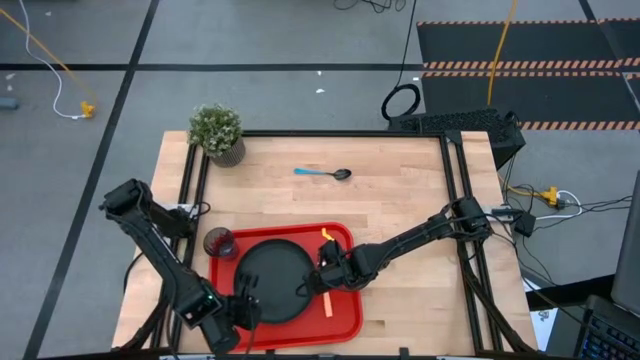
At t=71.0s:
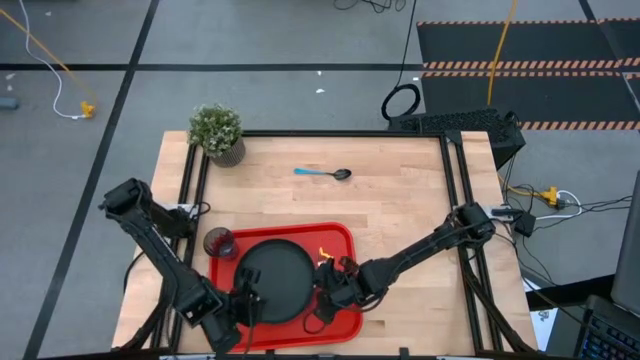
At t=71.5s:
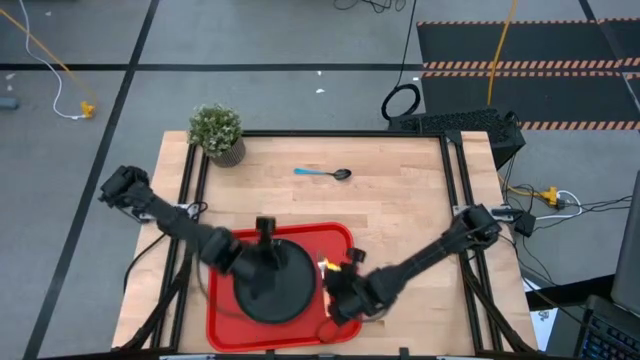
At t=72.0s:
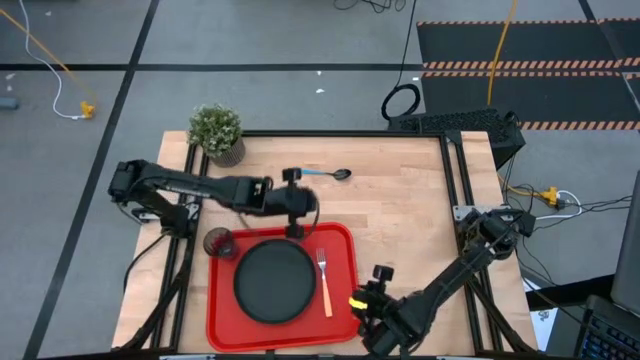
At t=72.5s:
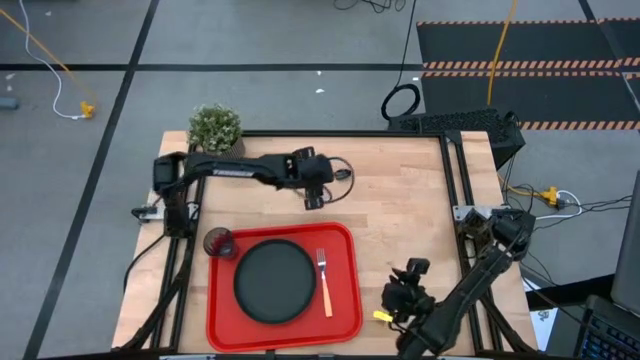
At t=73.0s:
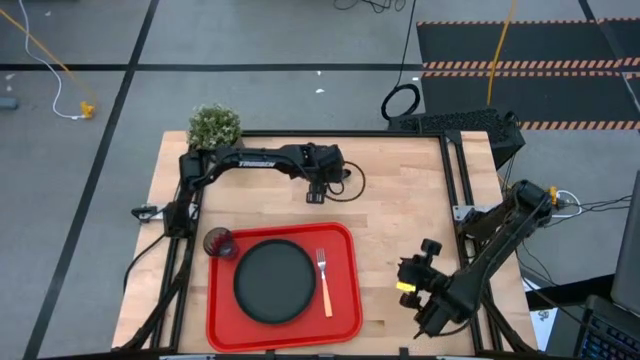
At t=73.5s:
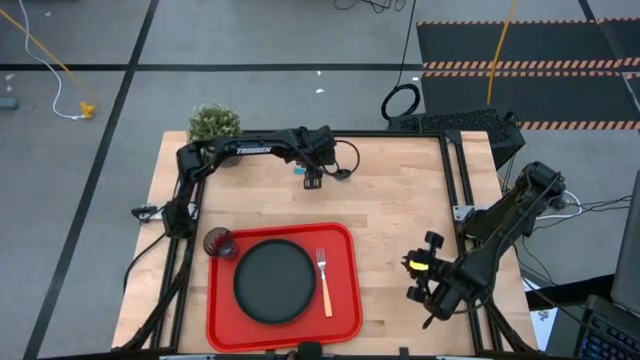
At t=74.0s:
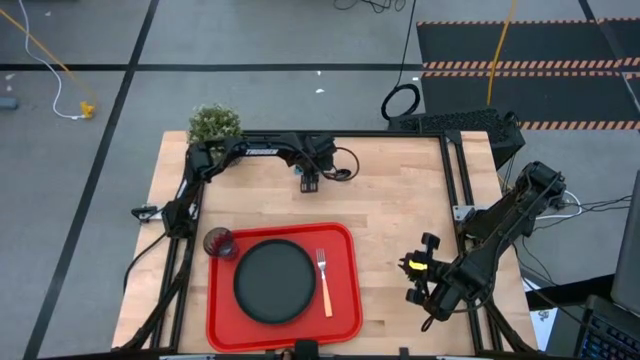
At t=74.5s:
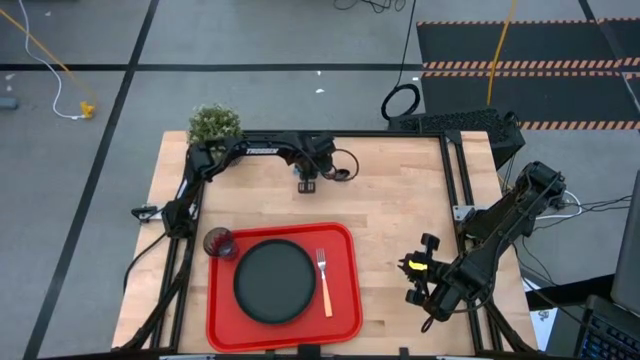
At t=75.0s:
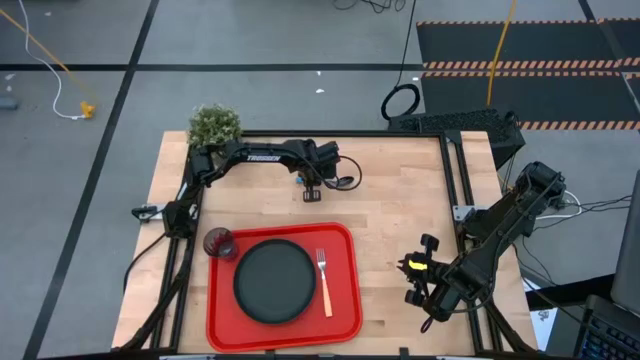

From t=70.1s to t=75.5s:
Task: Pick and place plate/cup/fork/spoon on tray
Put the blue spoon on red the serving tray on the right side of the orange fork

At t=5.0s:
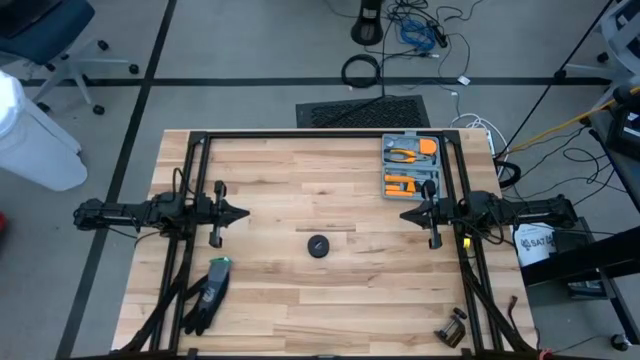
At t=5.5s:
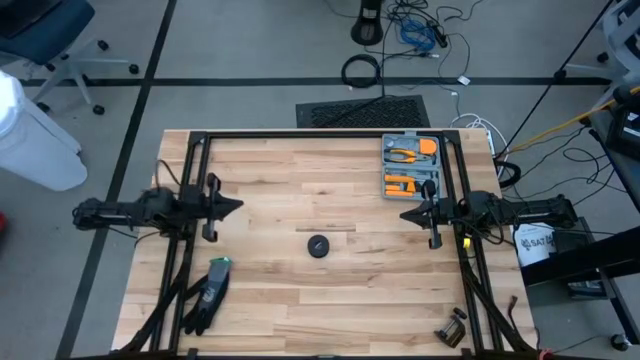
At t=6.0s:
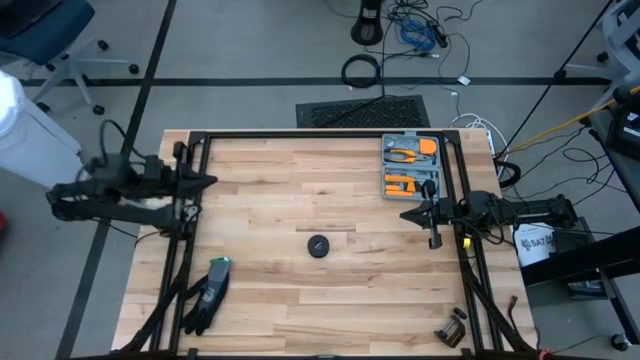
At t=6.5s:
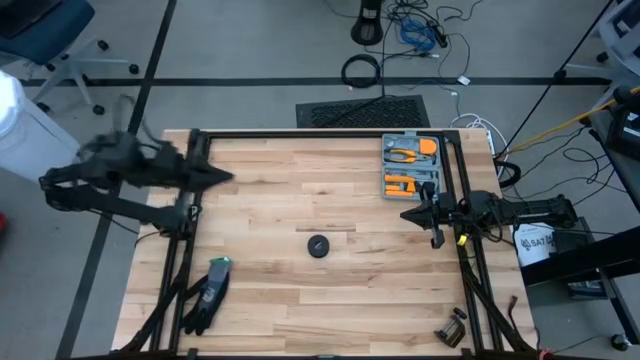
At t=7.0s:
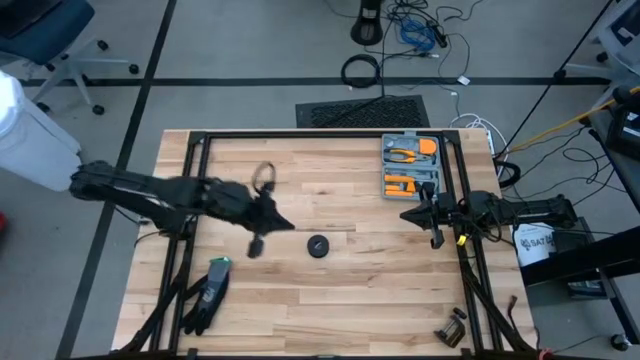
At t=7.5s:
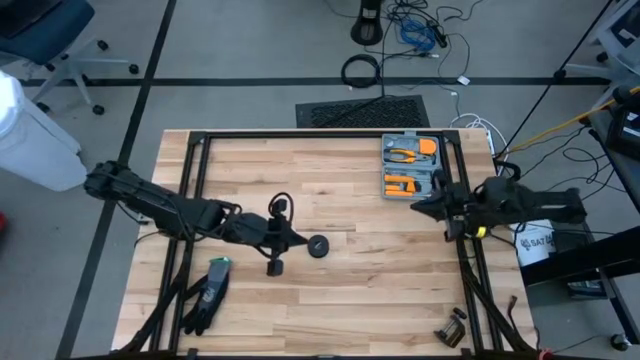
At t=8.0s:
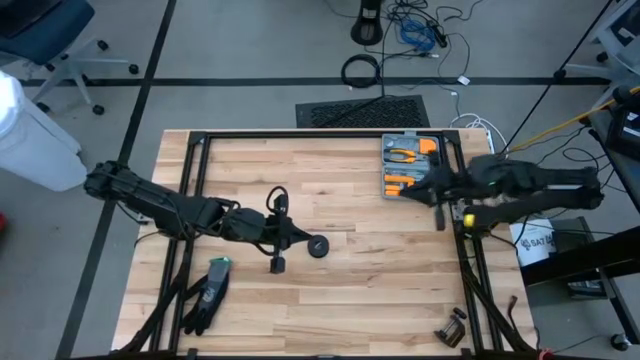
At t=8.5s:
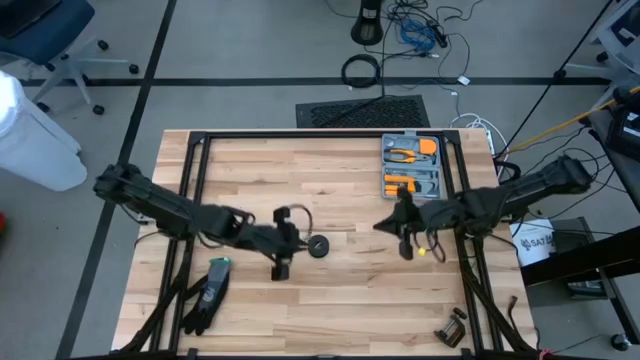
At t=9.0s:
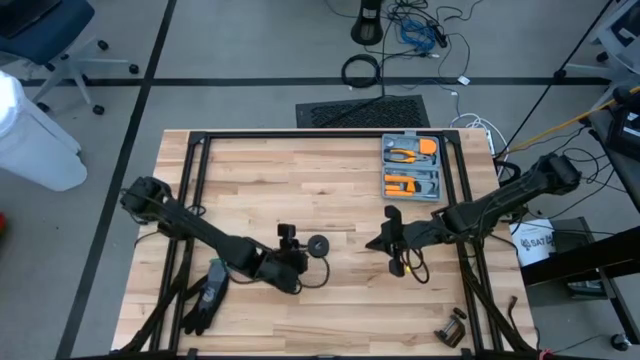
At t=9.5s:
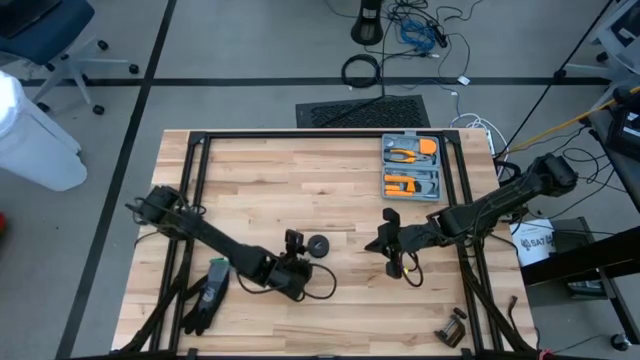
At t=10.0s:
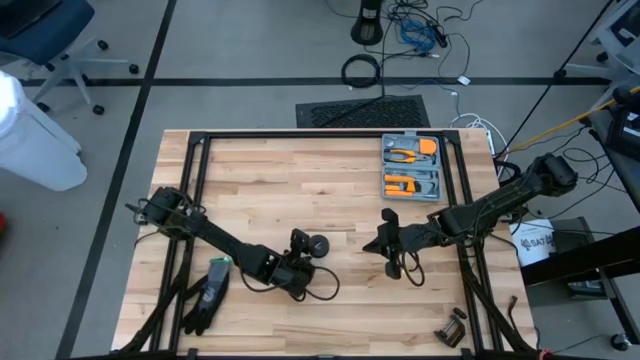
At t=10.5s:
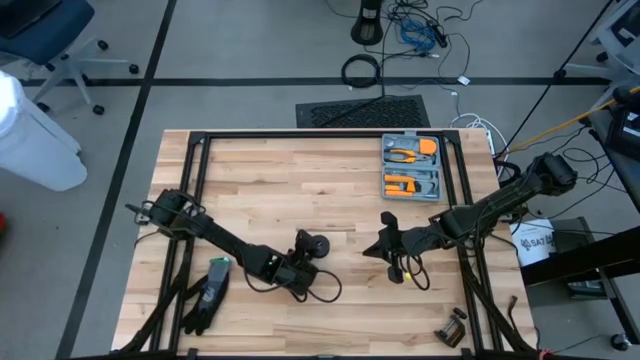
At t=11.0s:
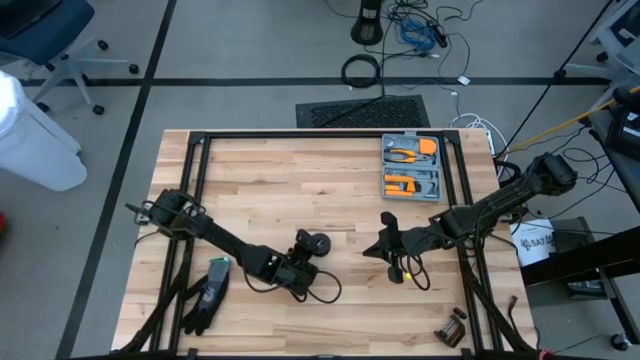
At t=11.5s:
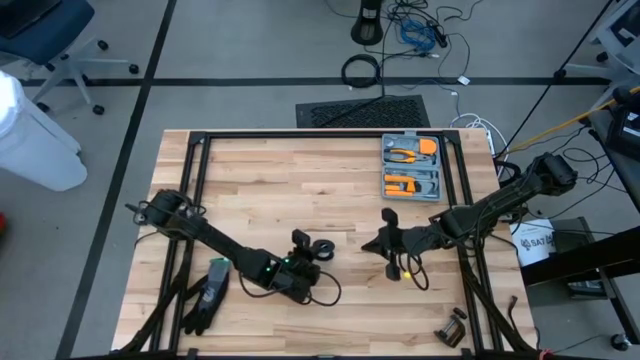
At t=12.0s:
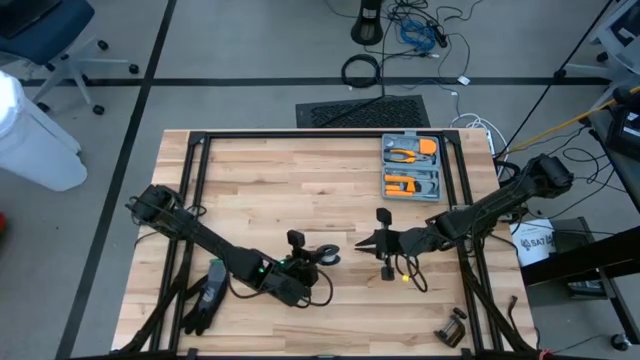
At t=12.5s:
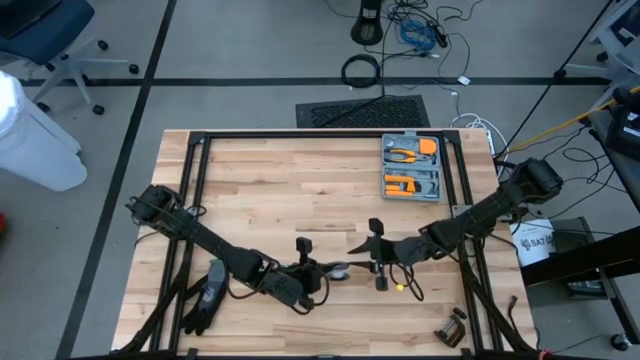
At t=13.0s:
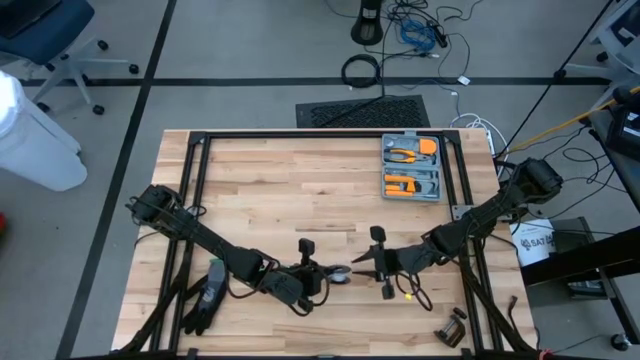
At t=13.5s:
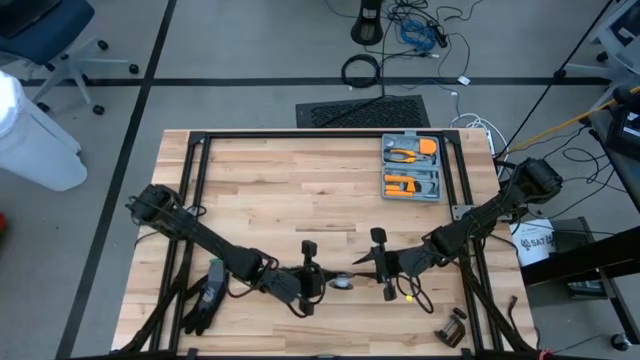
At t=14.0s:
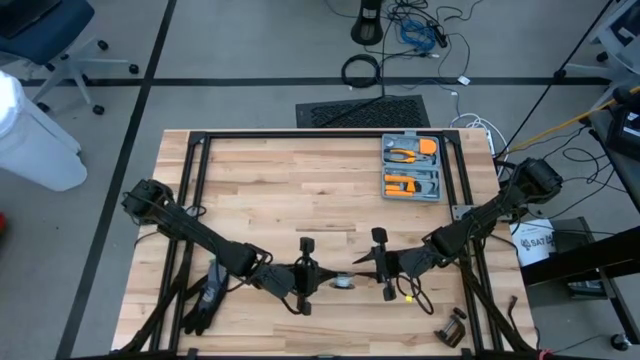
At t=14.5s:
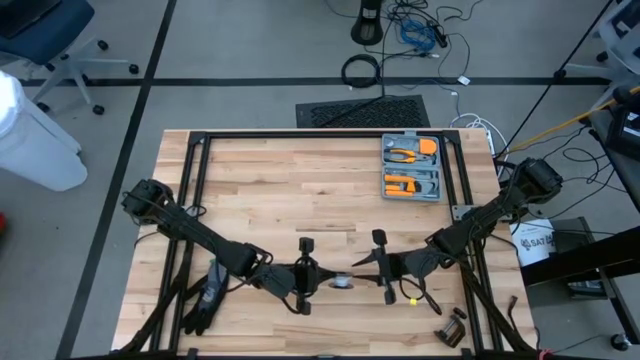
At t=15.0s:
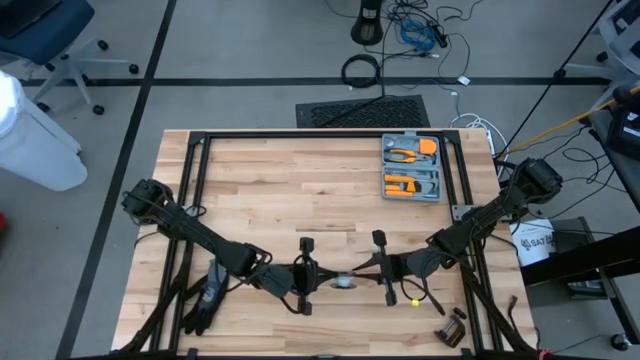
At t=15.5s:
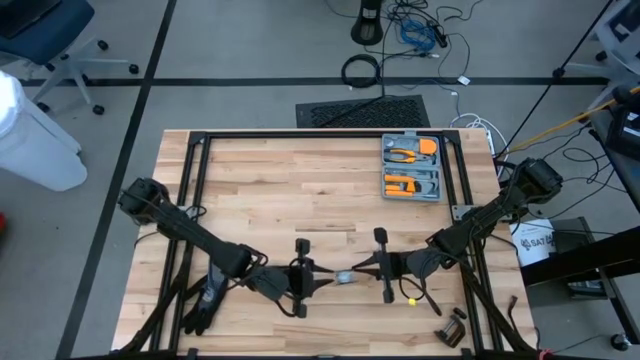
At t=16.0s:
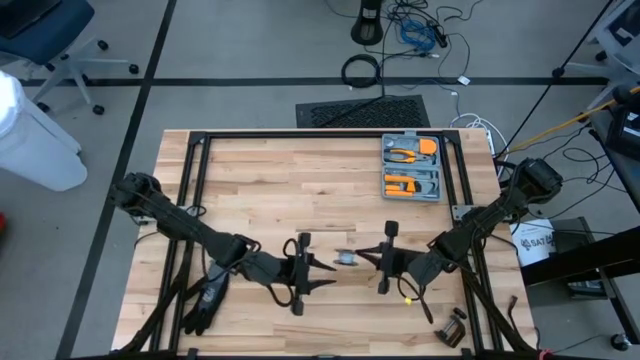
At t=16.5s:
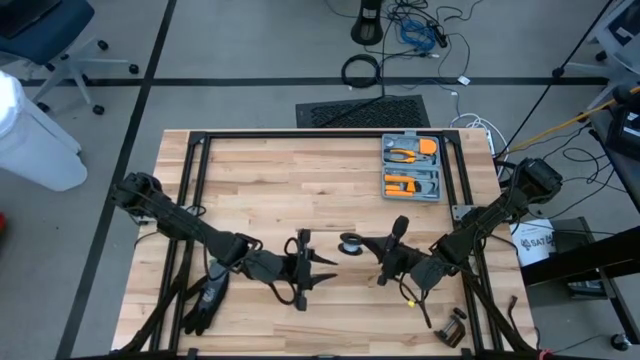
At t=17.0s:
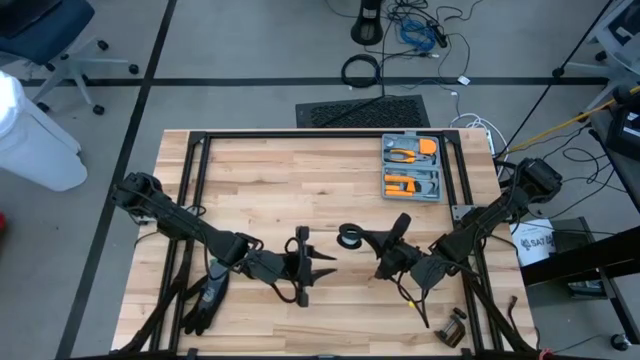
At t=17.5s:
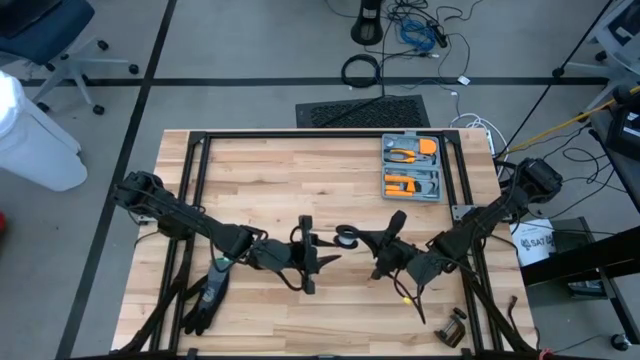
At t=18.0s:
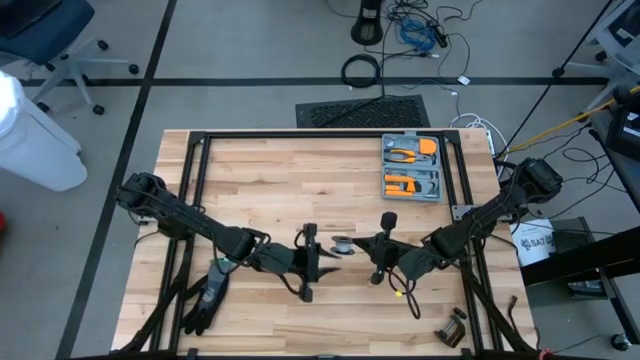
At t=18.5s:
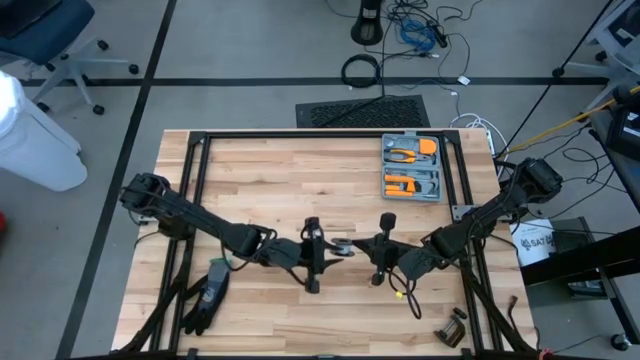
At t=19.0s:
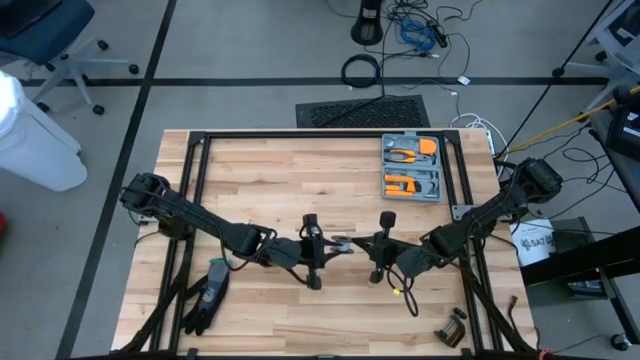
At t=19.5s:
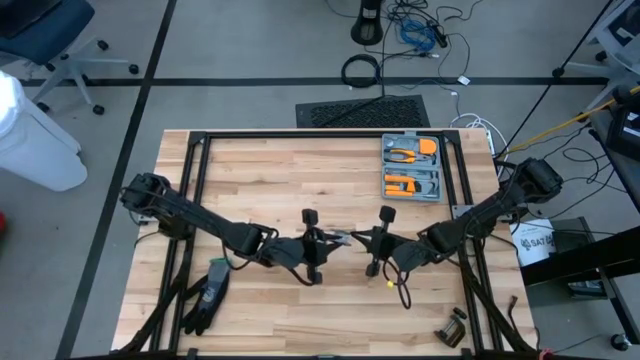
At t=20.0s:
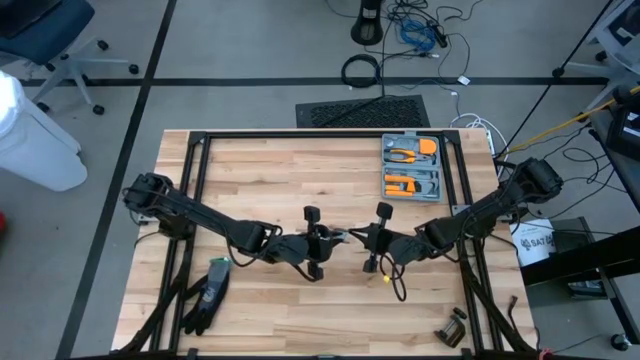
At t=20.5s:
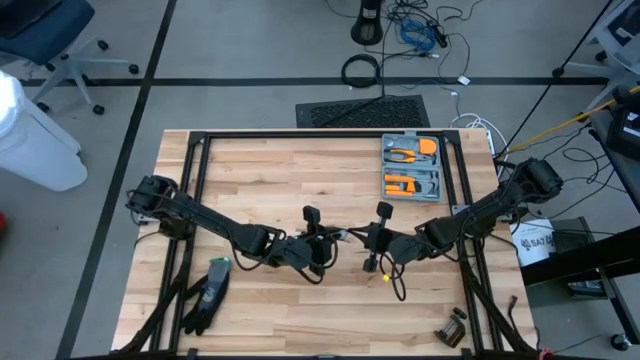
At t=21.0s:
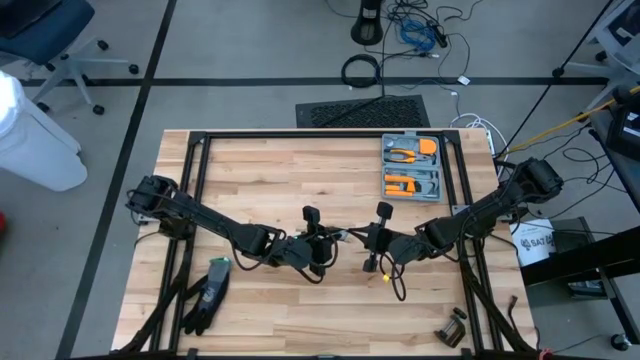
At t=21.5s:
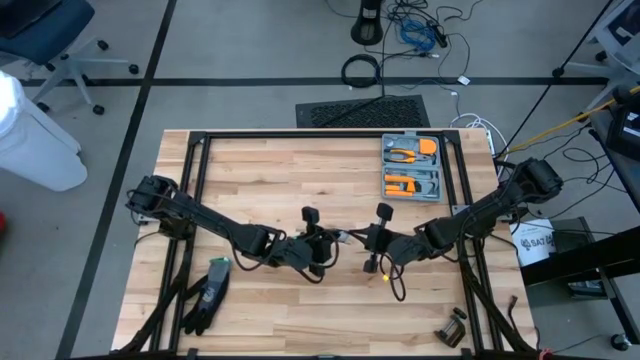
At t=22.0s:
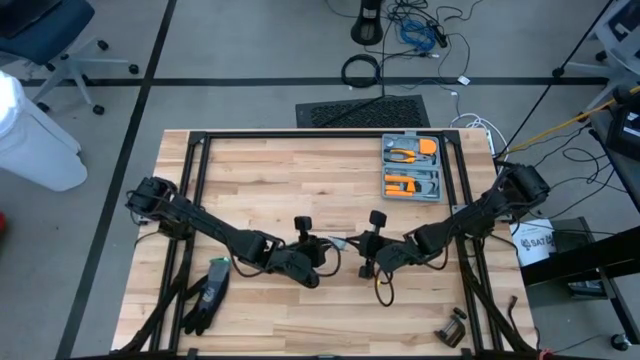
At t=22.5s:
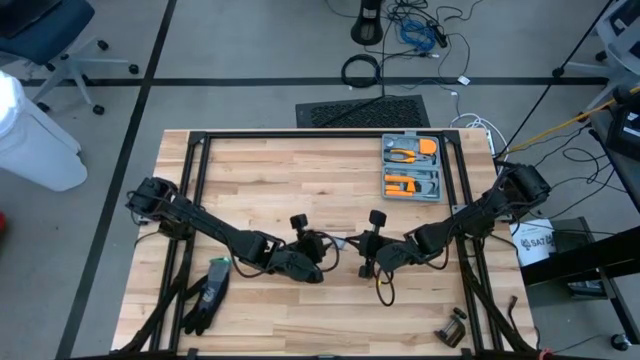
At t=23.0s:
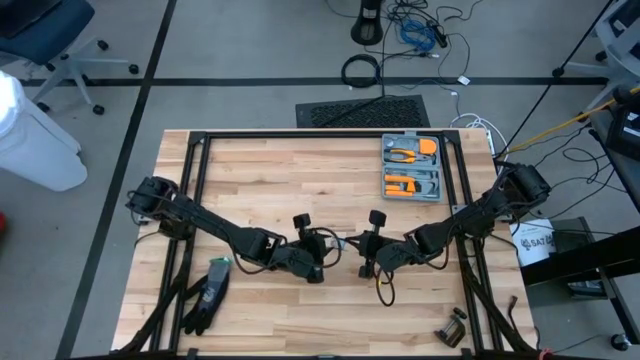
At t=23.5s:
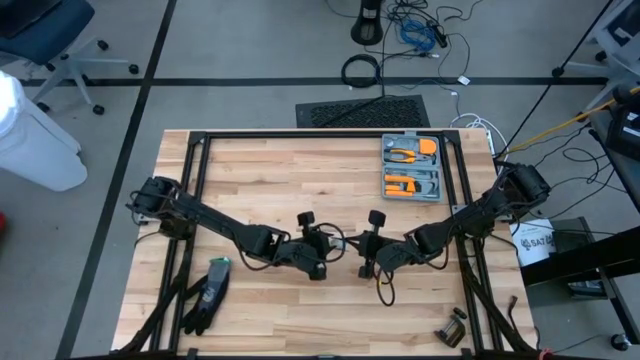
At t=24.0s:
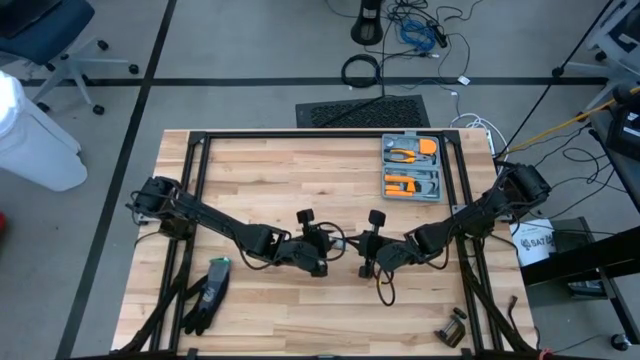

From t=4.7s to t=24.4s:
Task: Coil cords
Uncoil the white wire from the spool
